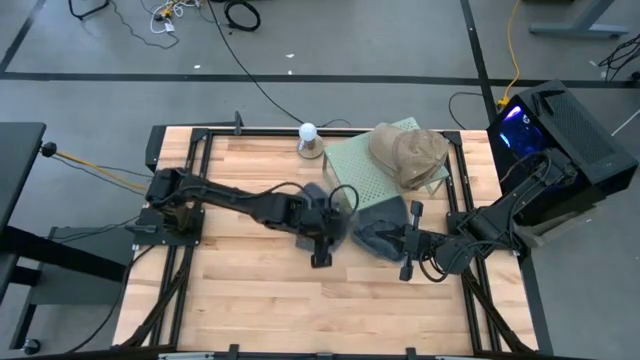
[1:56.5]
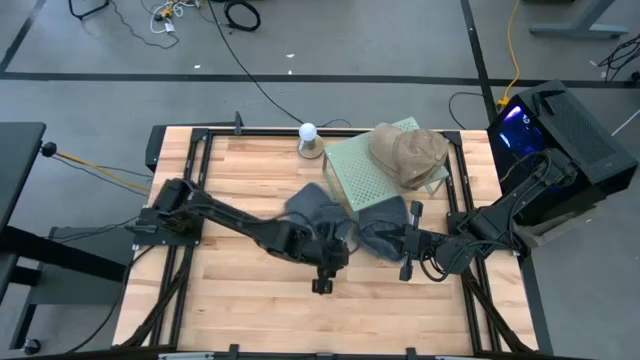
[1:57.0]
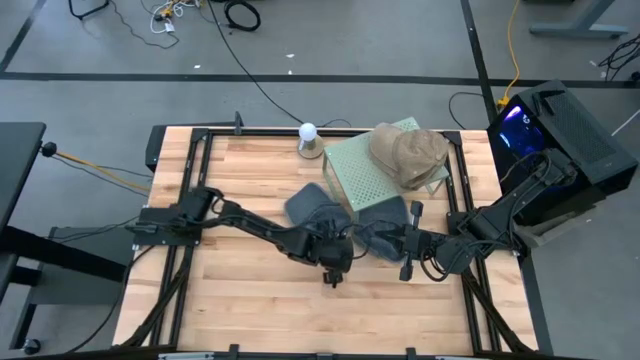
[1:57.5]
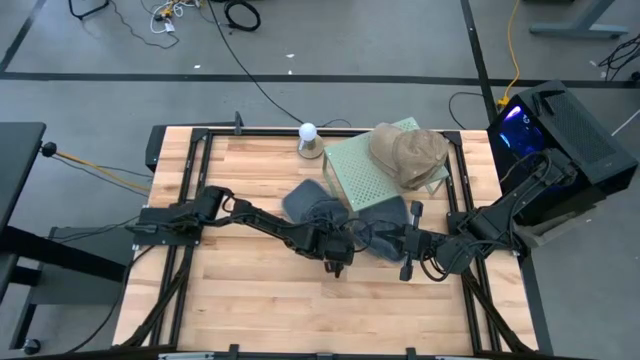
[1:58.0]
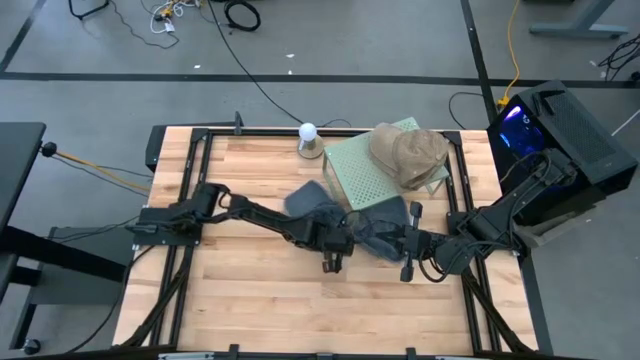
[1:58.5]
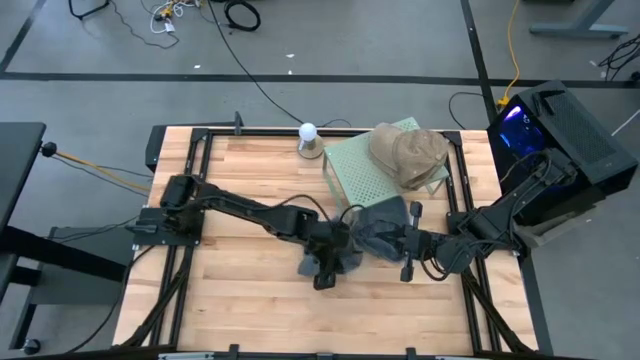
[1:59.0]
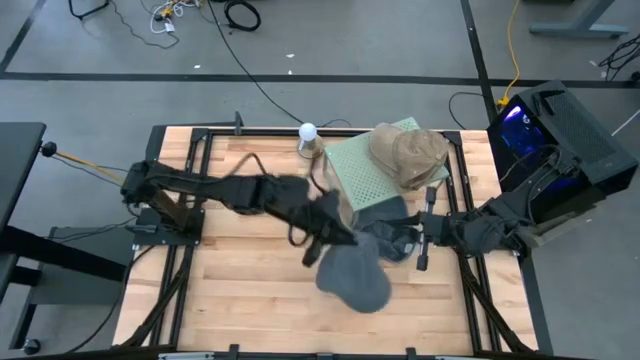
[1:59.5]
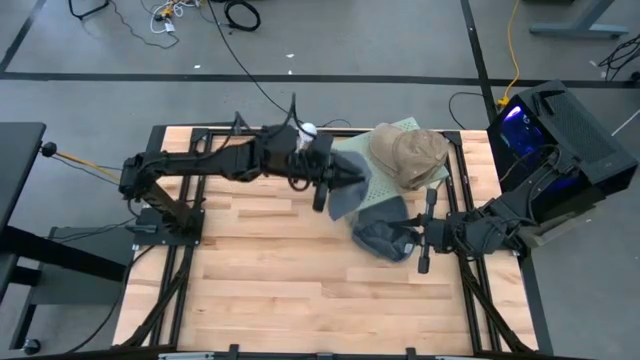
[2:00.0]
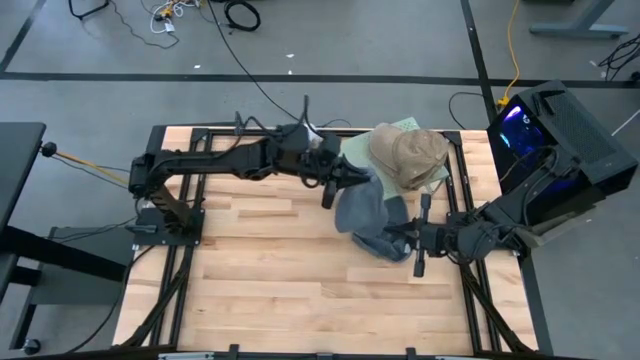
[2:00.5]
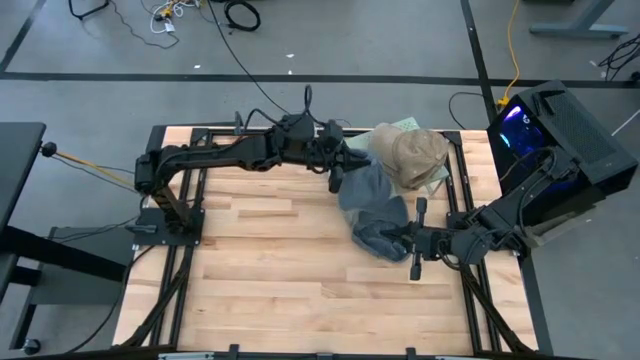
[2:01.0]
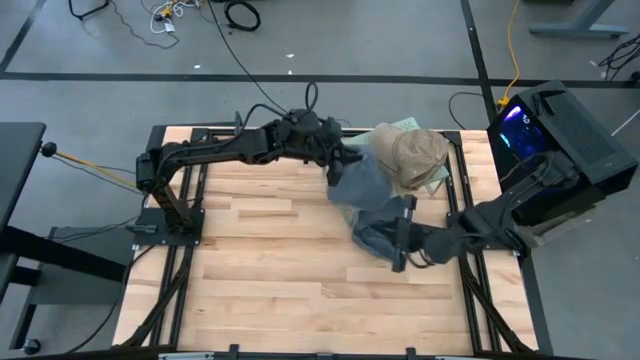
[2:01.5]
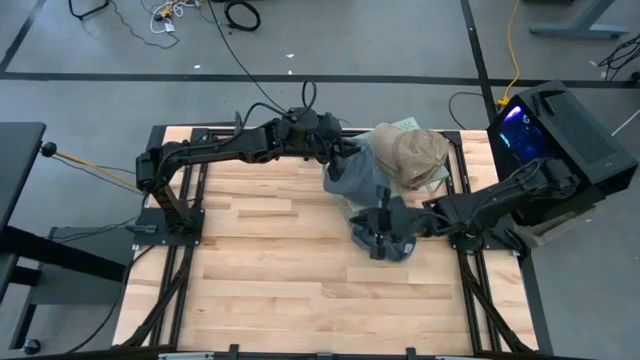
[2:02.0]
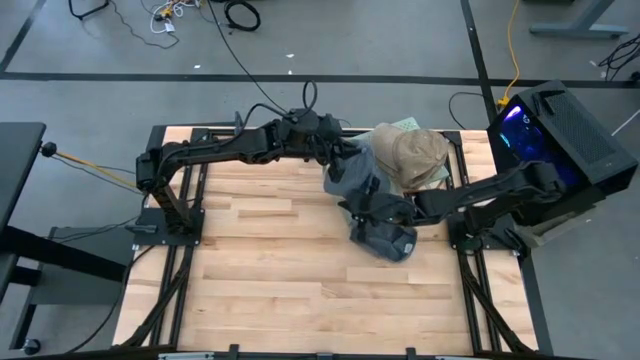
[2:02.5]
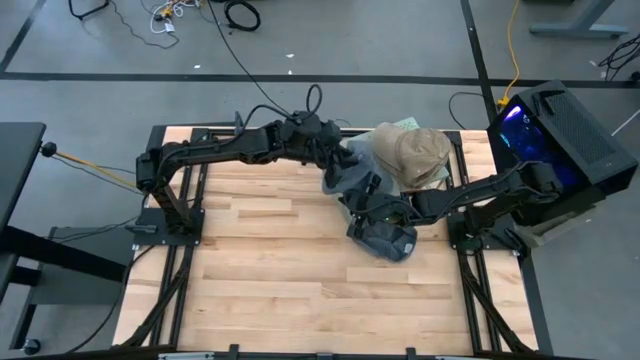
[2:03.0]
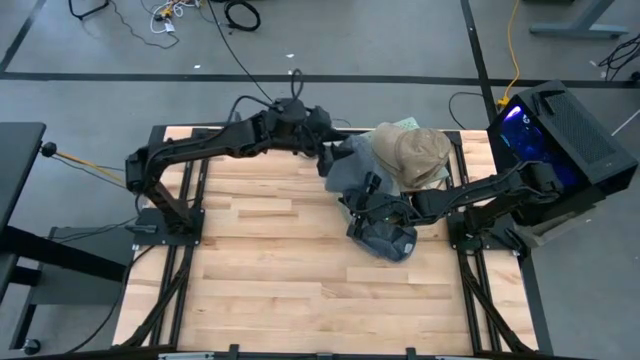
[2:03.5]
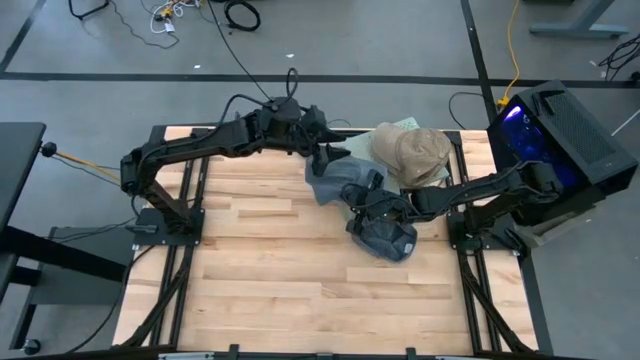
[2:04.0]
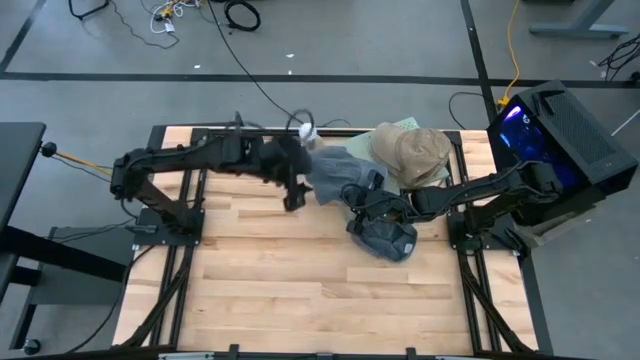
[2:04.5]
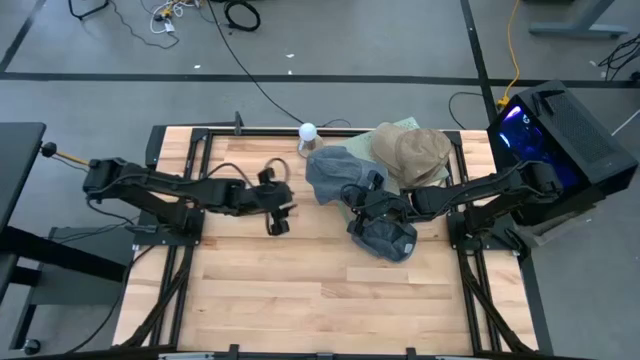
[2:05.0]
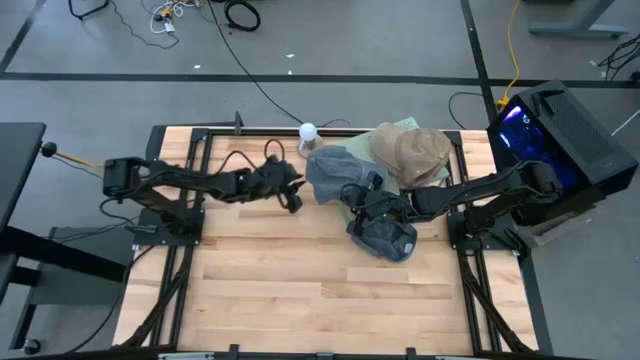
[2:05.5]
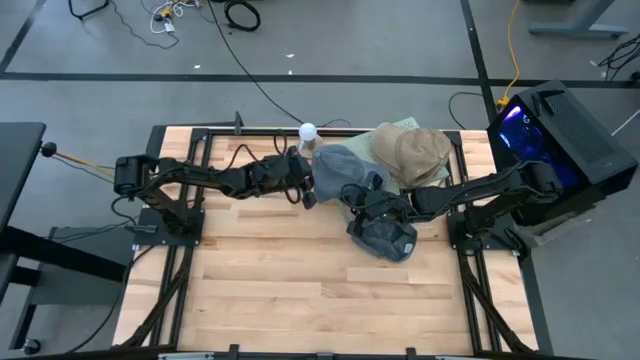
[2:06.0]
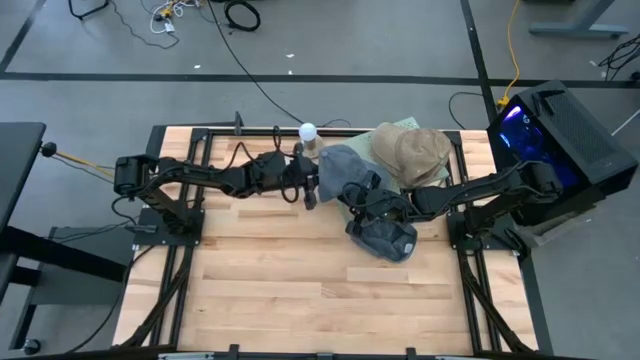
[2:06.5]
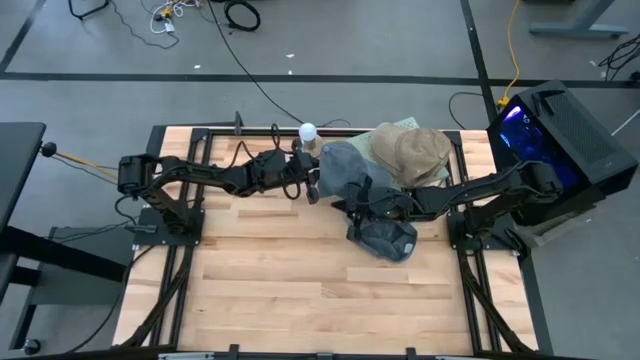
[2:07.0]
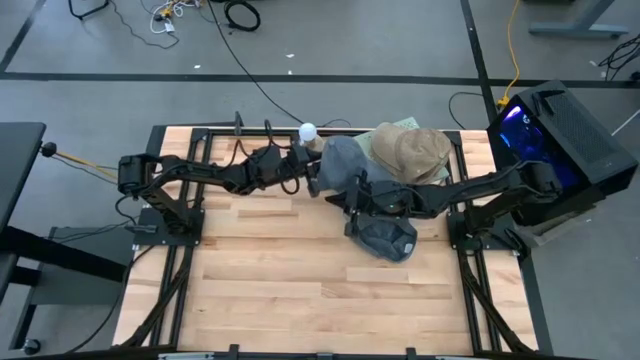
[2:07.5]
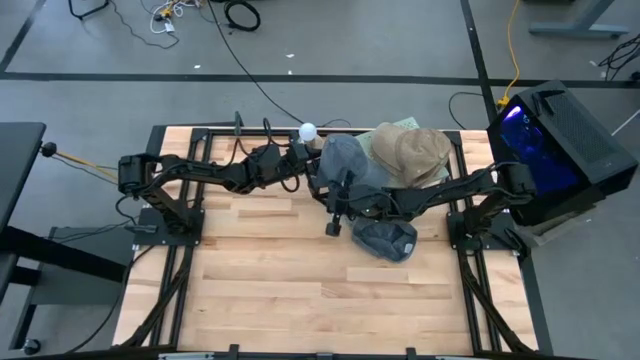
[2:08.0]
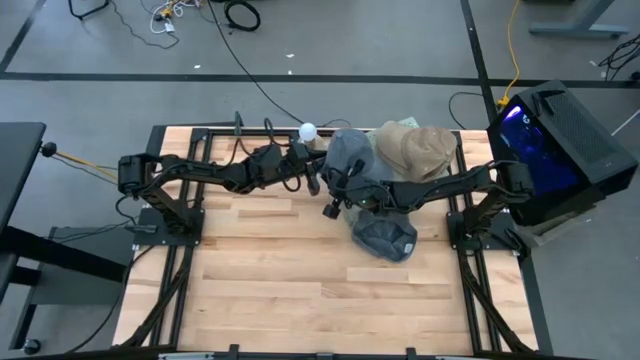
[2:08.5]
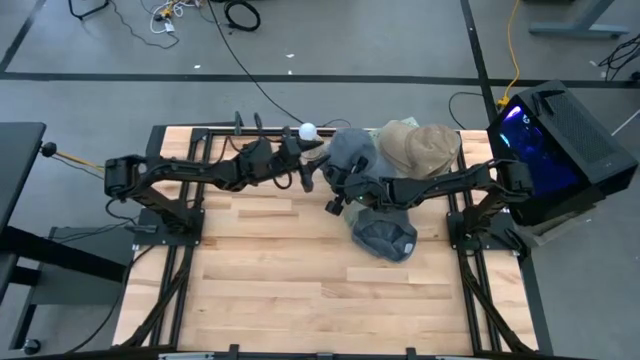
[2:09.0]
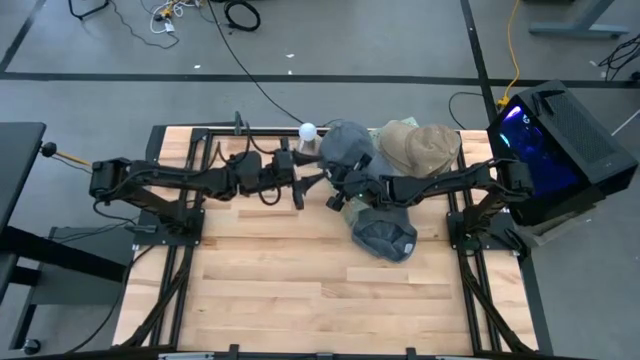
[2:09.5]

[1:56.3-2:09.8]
Task: Stack caps on shelf
Put the left black cup on the shelf

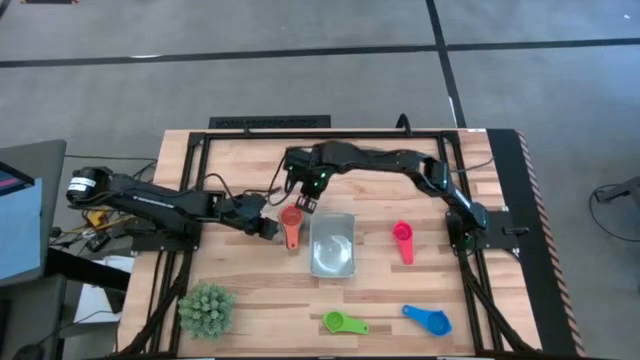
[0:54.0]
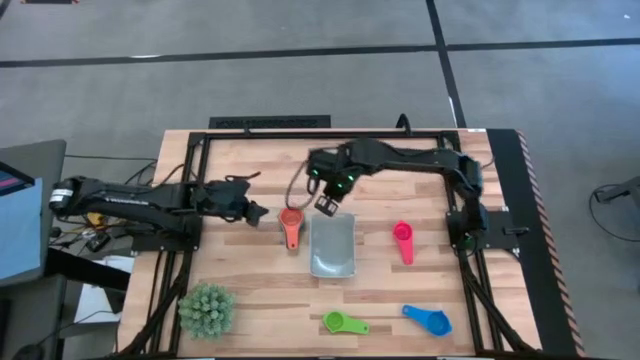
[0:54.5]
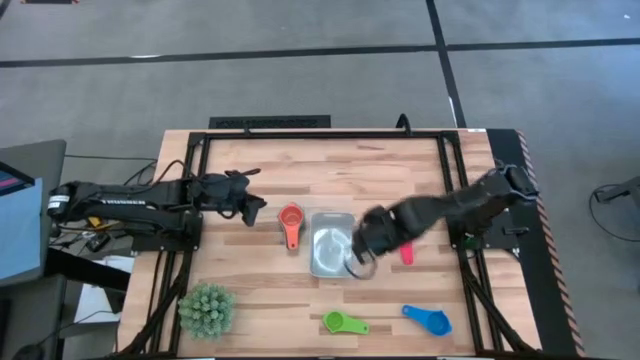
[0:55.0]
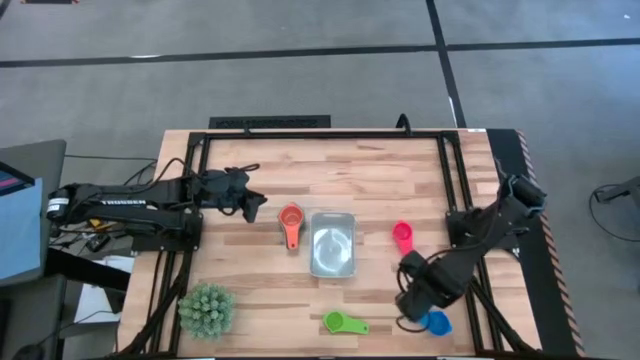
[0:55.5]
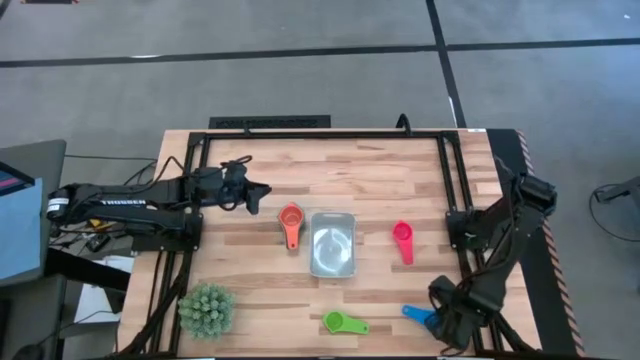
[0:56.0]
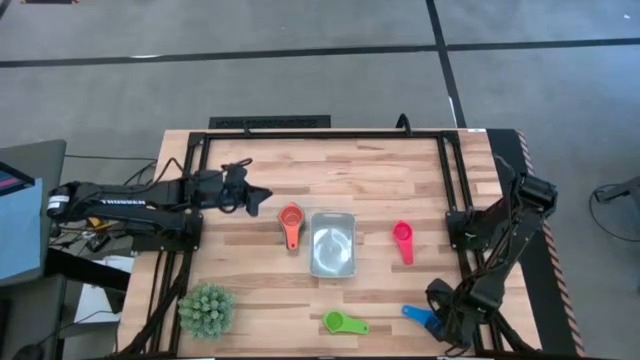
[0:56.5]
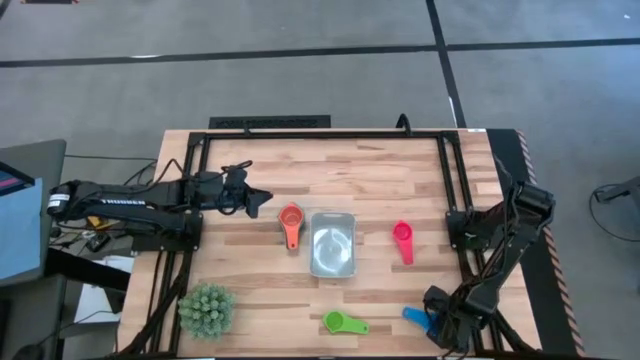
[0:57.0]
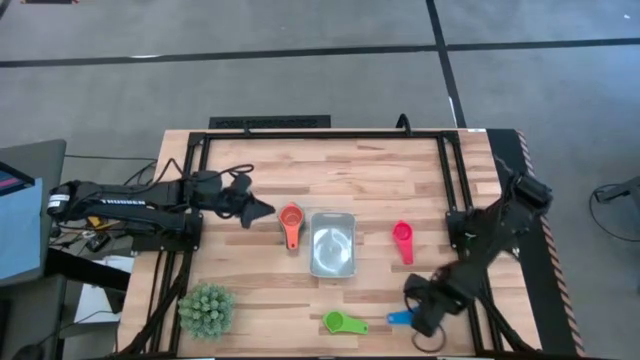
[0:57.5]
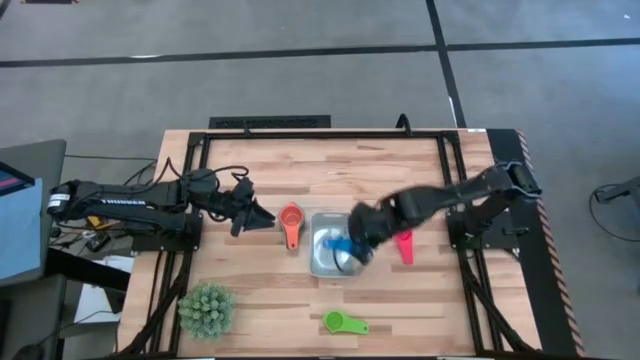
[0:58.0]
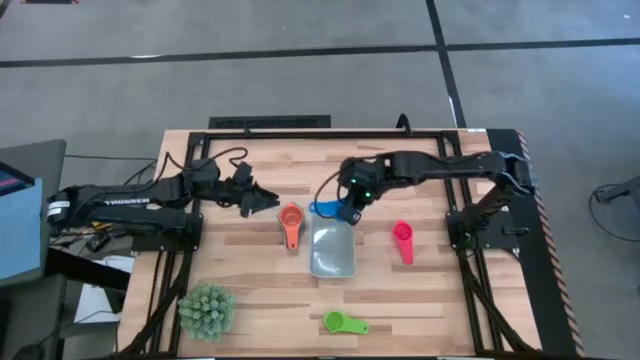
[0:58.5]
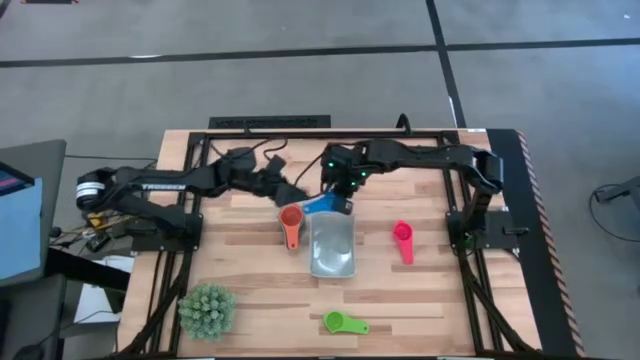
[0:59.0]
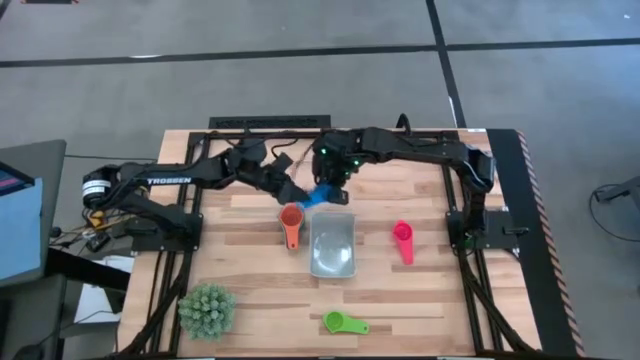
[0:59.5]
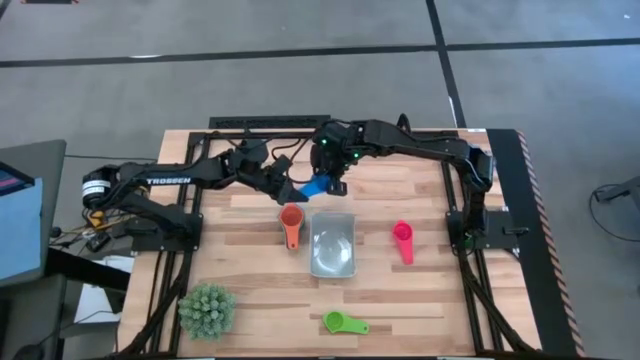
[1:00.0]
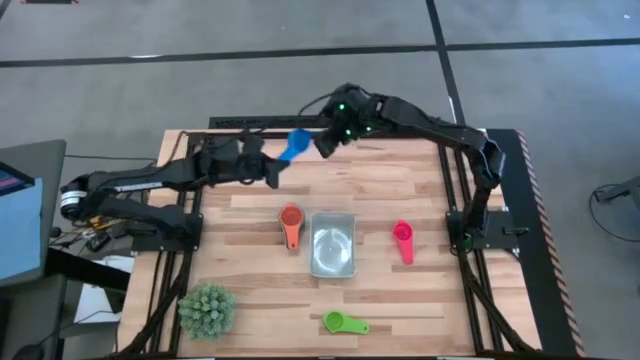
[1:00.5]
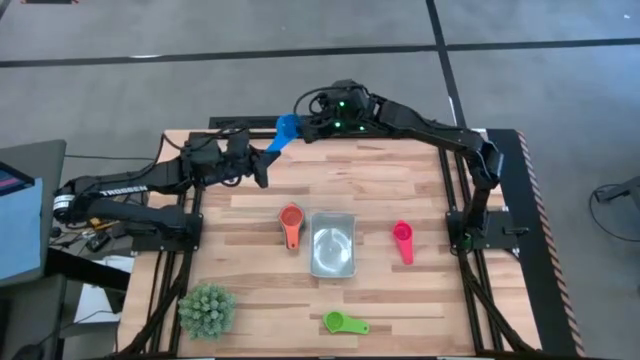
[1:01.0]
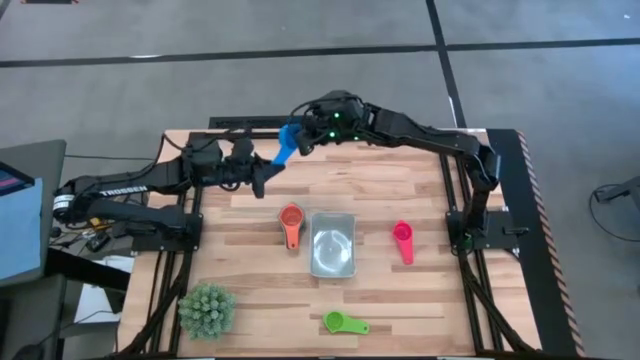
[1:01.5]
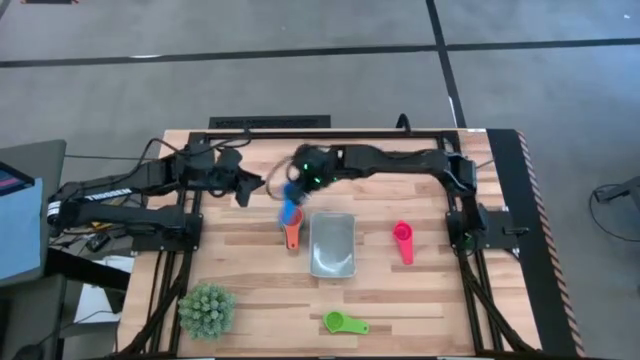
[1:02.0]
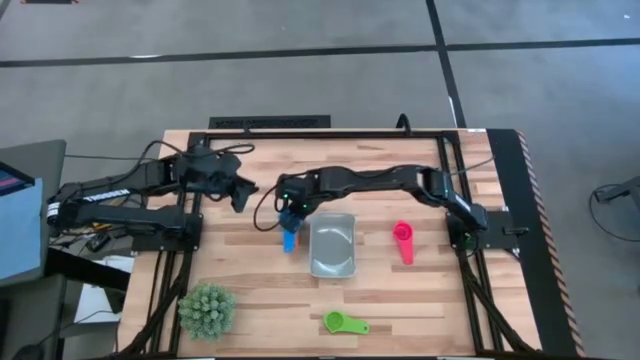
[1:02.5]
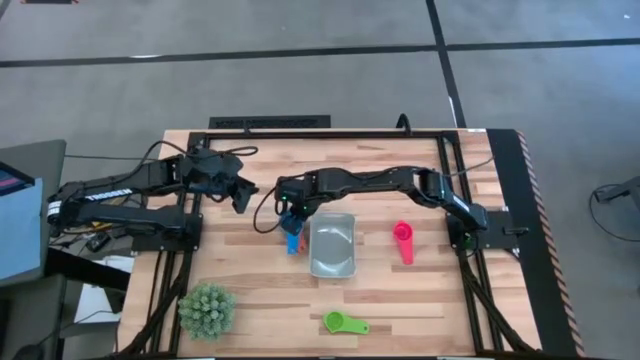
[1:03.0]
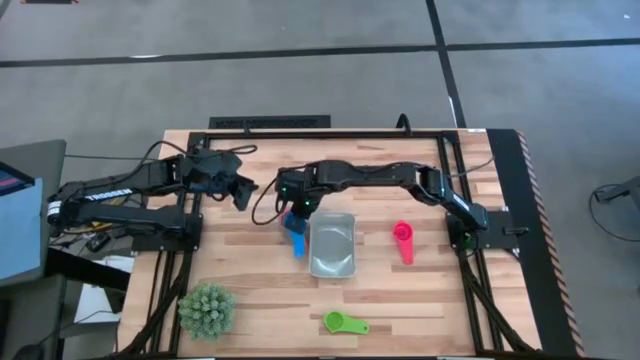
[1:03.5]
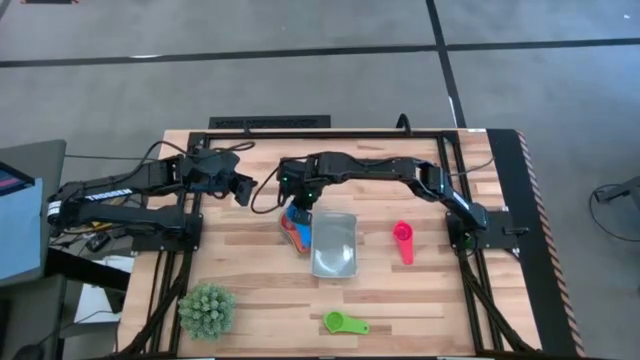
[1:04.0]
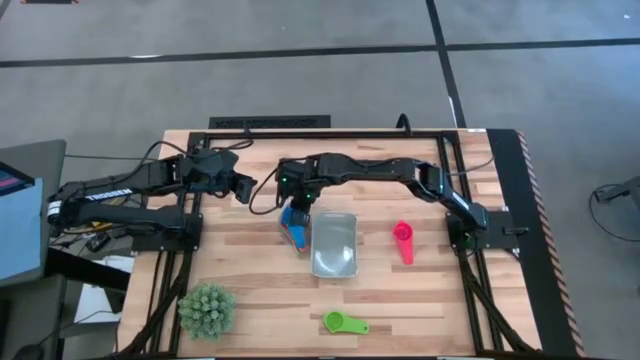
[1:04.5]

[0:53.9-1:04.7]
Task: Nest measuring cups in basket
Stack the blue measuring cup on top of the orange measuring cup
